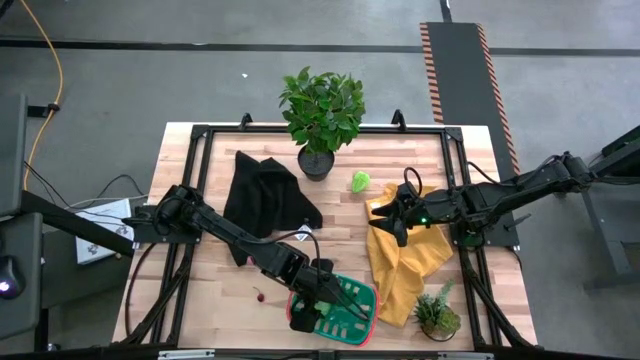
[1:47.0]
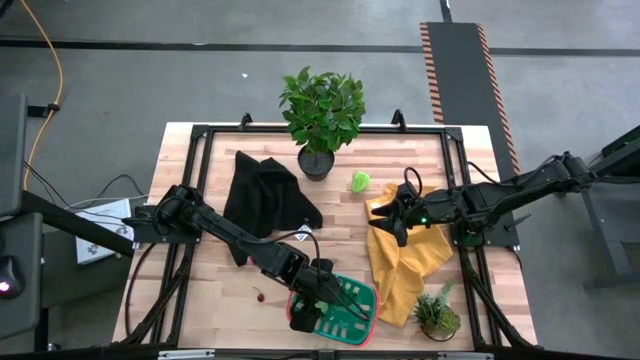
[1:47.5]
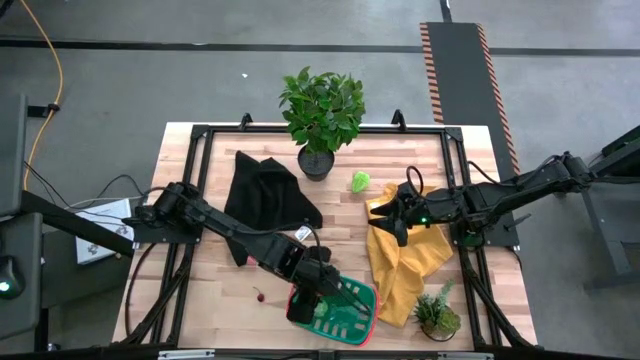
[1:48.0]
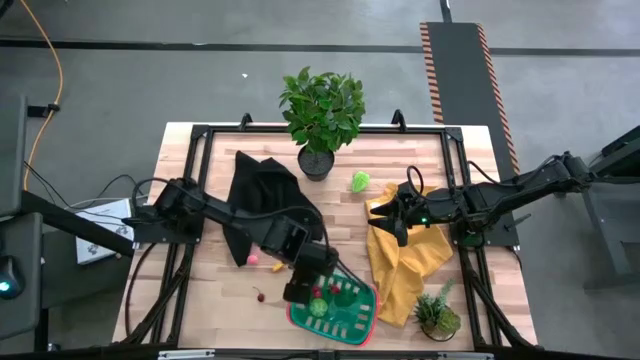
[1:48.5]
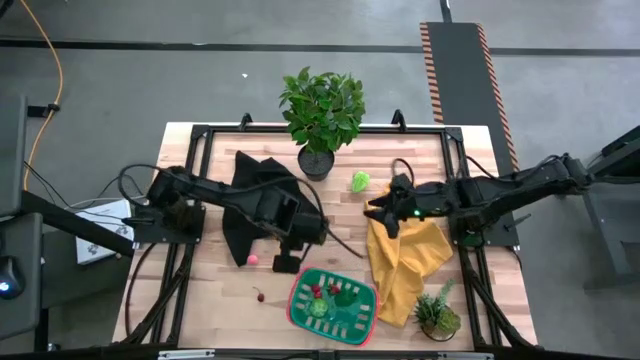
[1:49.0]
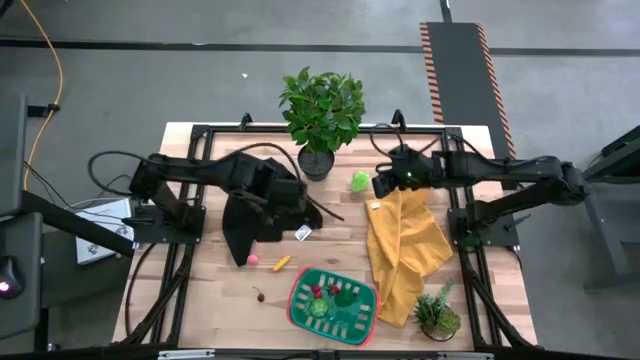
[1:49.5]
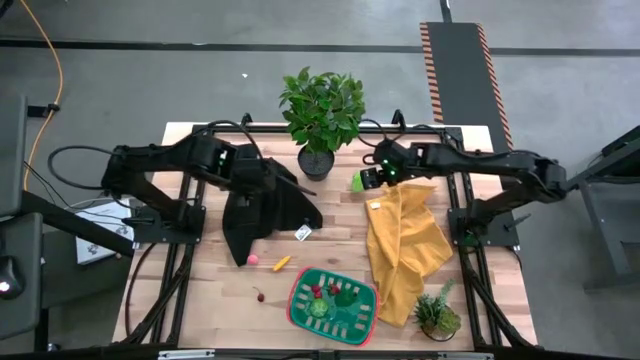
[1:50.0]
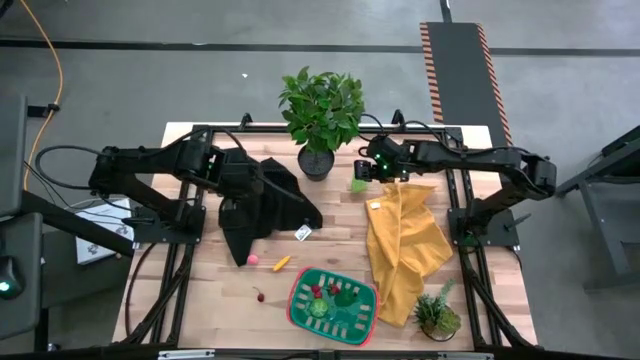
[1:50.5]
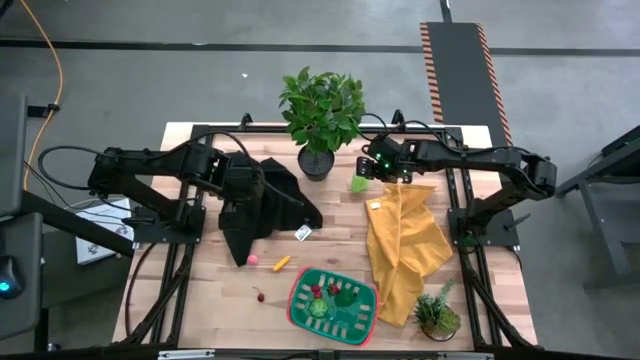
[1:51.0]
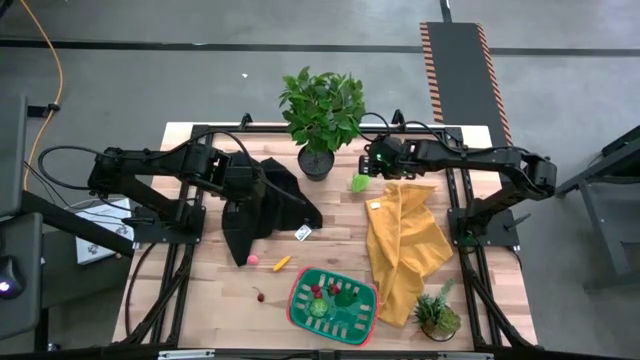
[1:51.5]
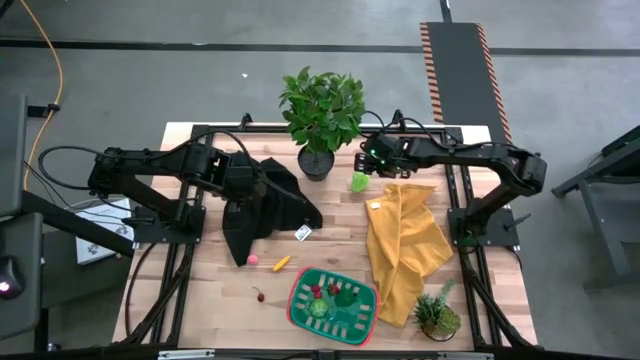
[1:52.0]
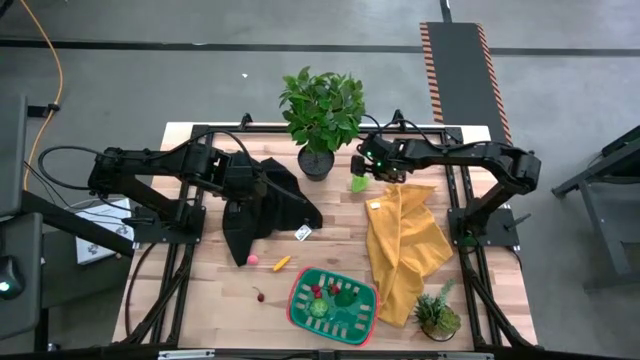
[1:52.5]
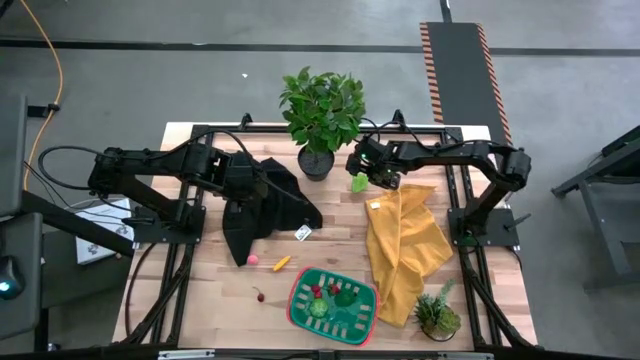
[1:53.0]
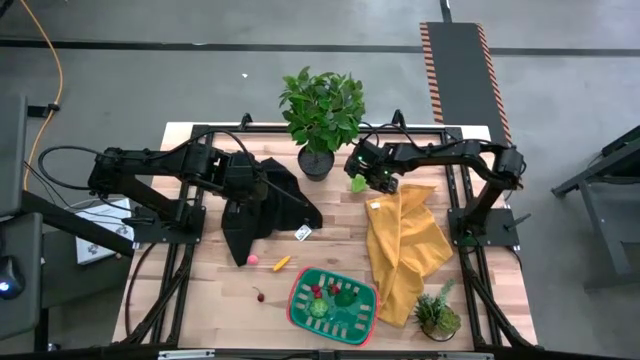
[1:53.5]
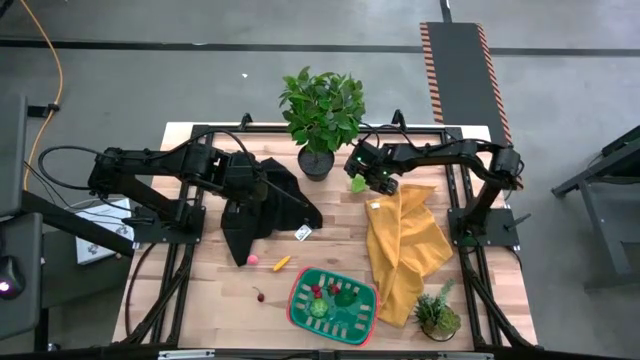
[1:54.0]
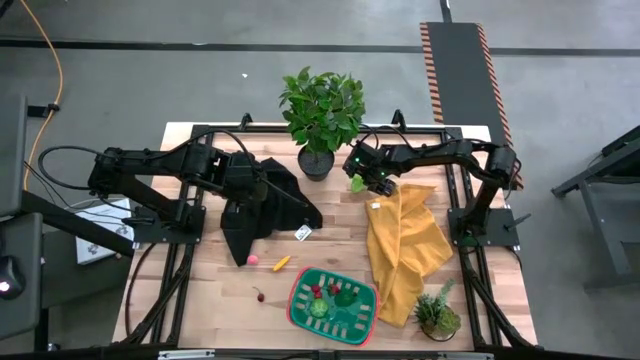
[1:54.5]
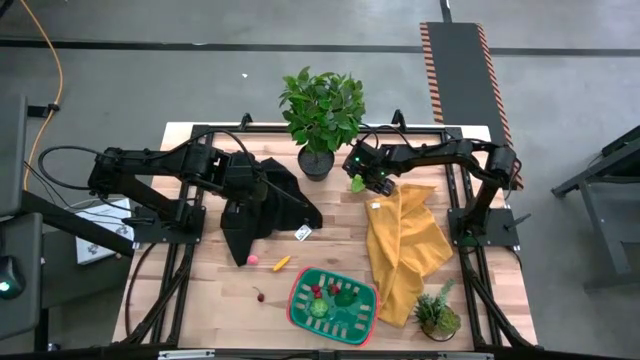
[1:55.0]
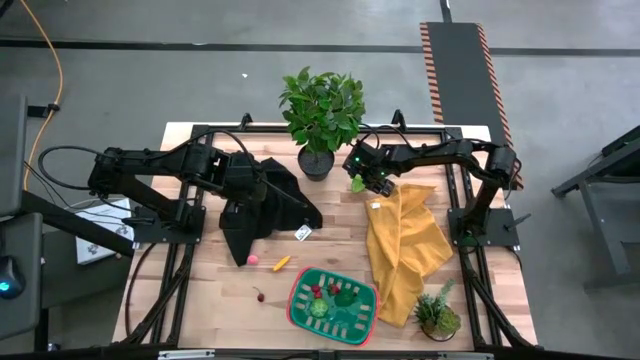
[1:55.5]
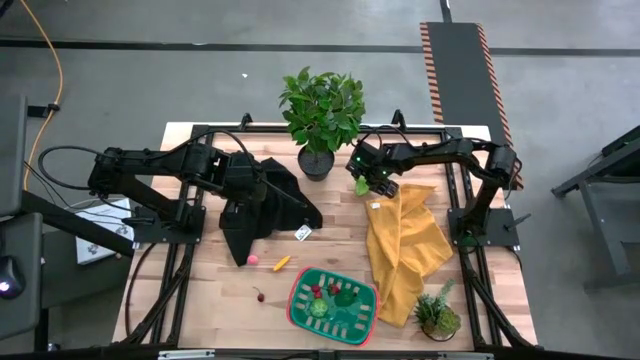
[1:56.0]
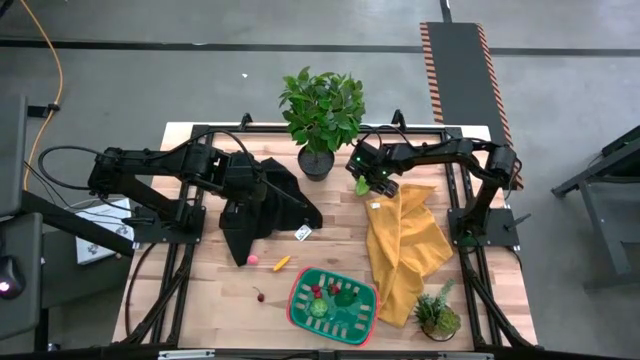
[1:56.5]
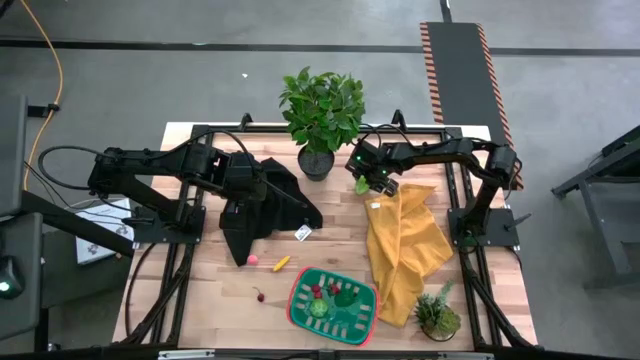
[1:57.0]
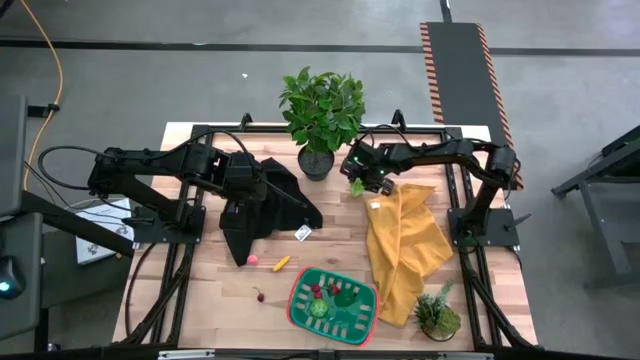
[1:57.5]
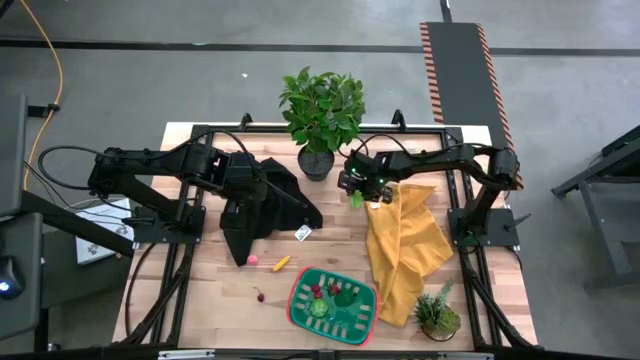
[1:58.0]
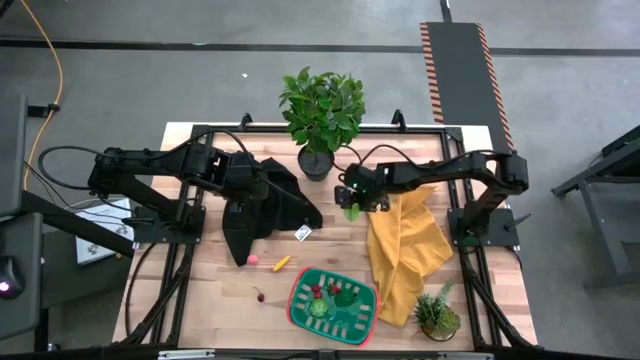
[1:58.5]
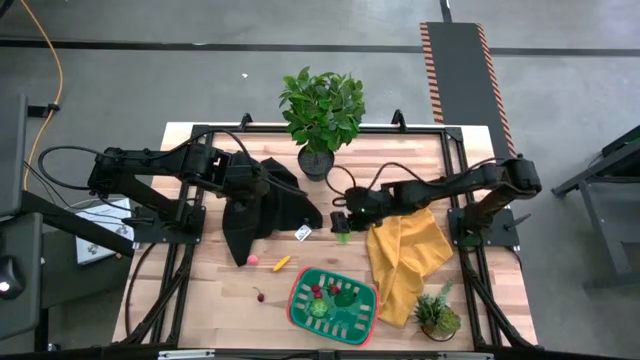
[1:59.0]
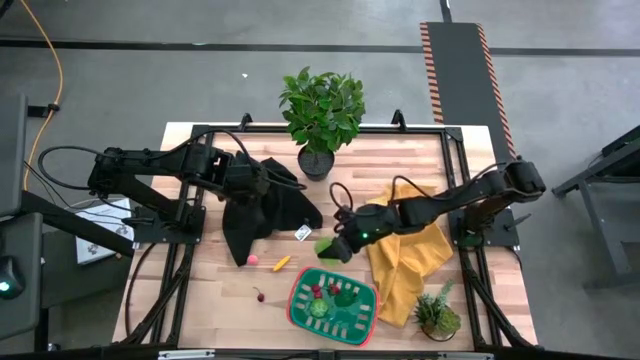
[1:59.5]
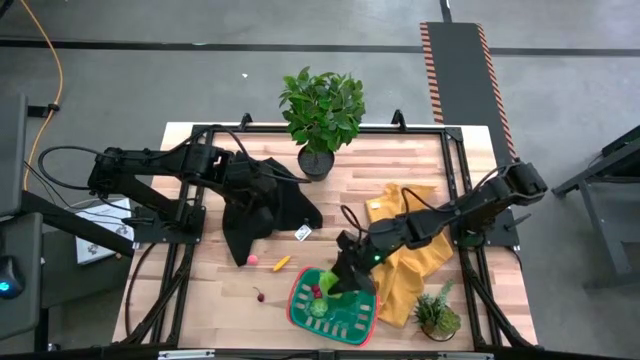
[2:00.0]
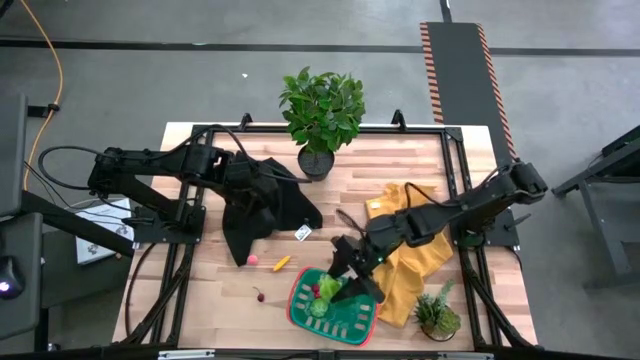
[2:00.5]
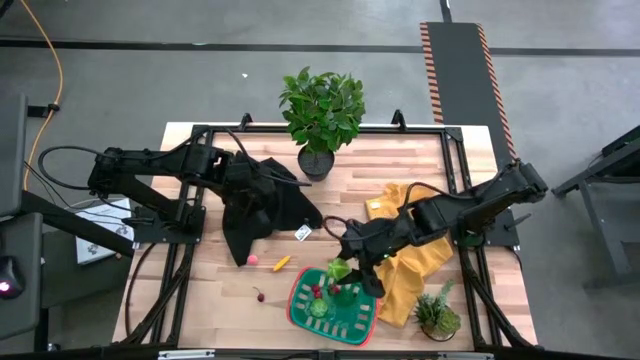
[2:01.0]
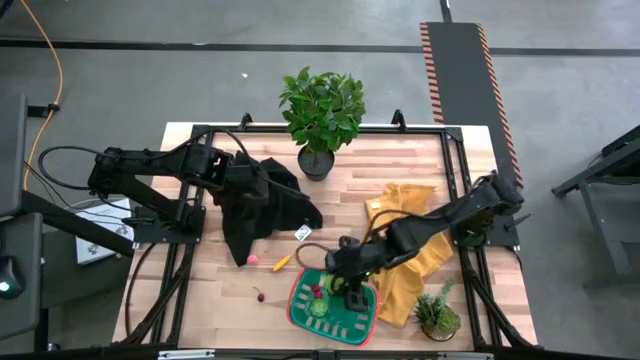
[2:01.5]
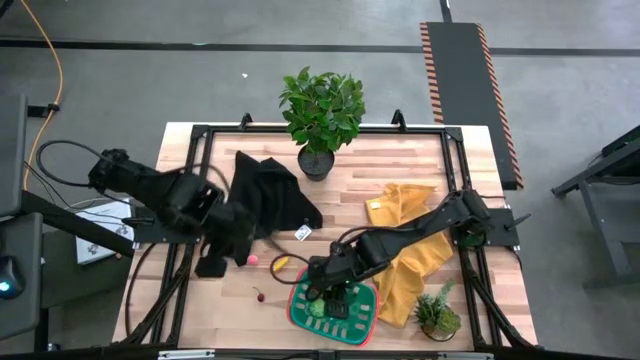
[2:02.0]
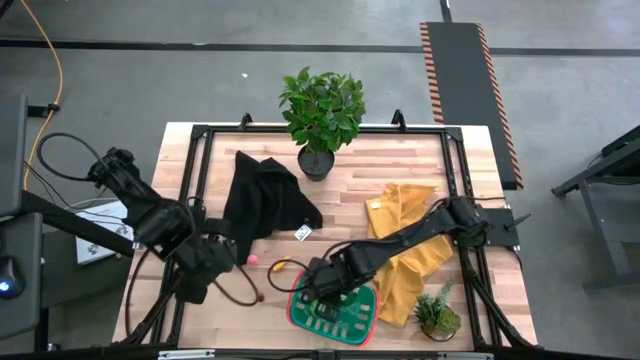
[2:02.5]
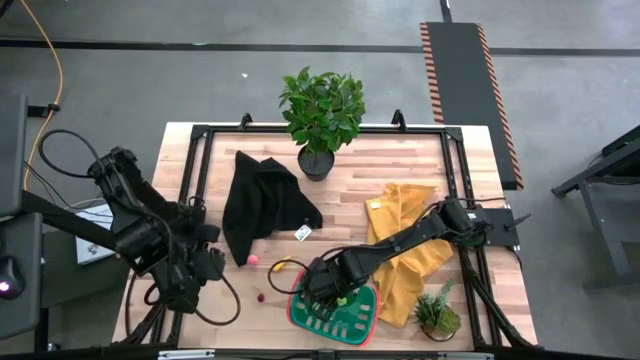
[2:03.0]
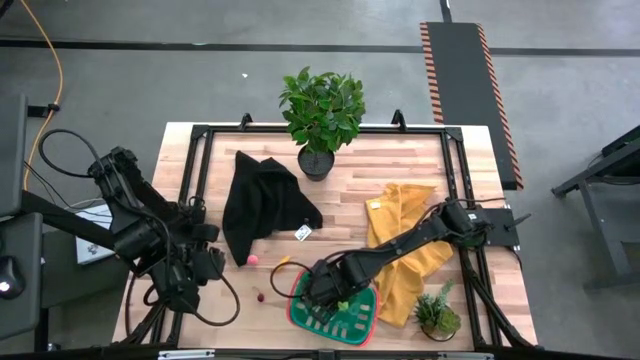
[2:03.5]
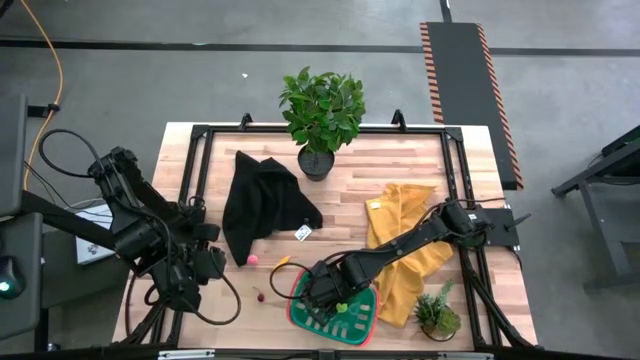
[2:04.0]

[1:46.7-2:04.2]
Task: Pick and placing Produce into tupperware
Put the green star fruit into the blue bin

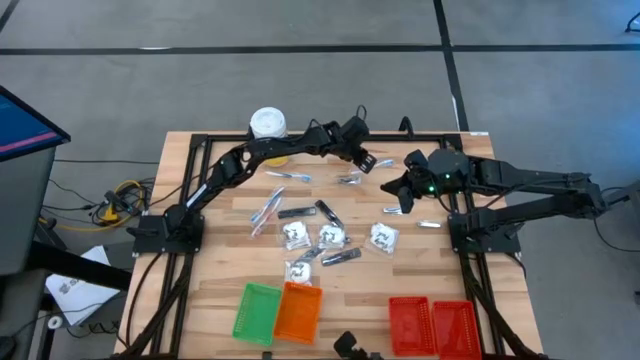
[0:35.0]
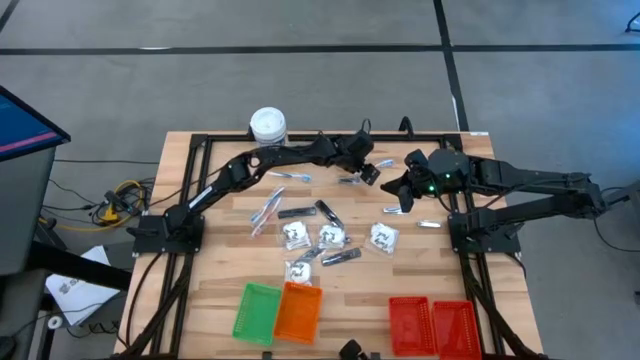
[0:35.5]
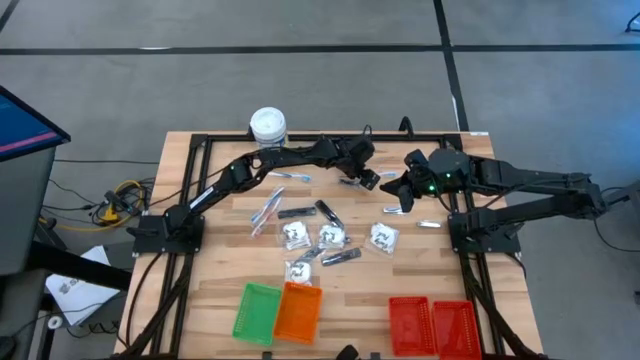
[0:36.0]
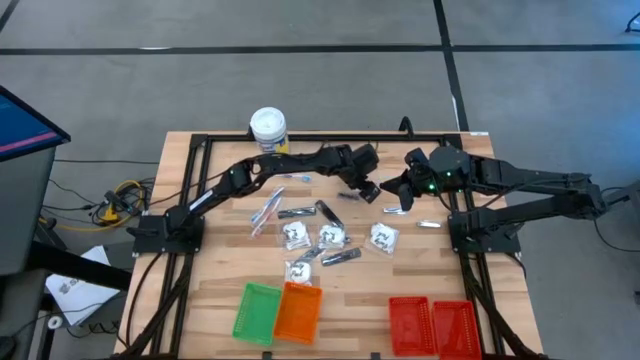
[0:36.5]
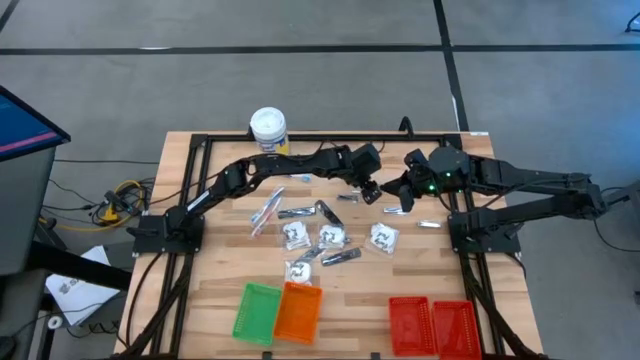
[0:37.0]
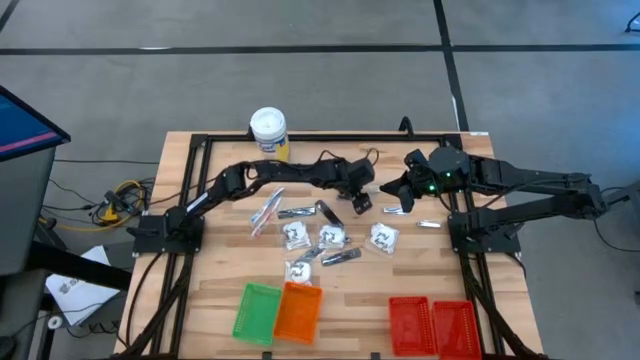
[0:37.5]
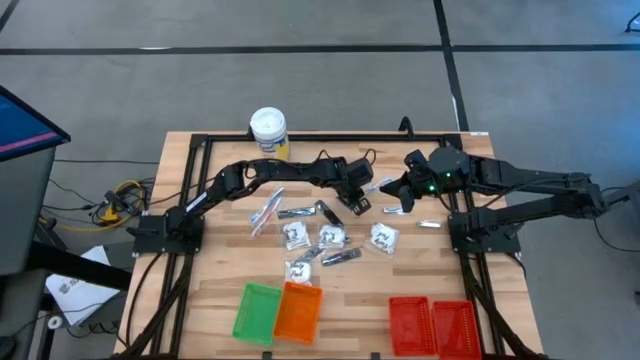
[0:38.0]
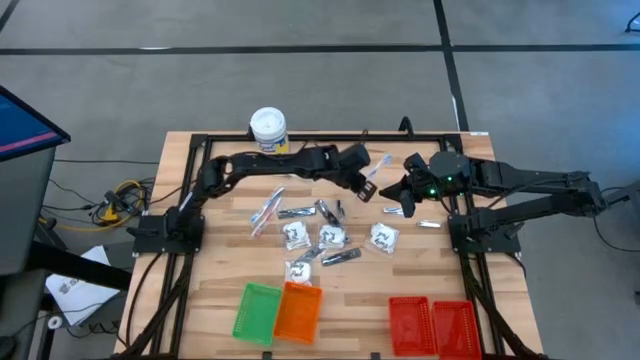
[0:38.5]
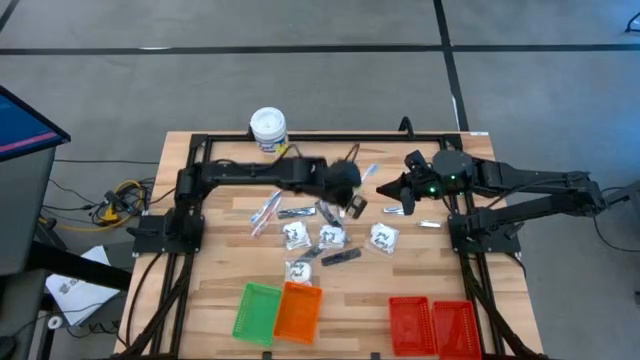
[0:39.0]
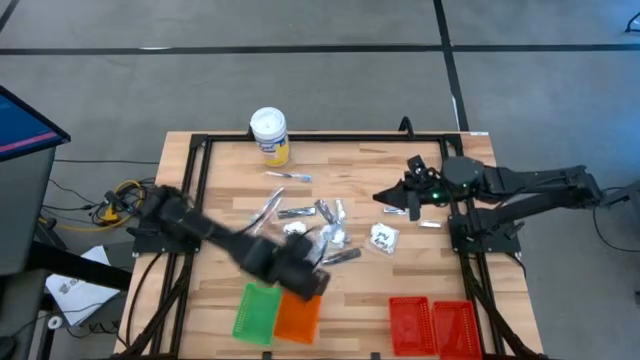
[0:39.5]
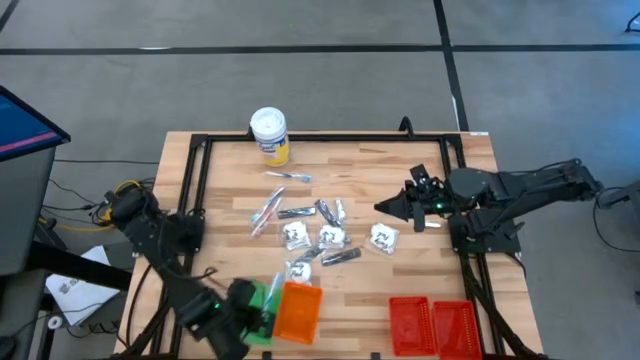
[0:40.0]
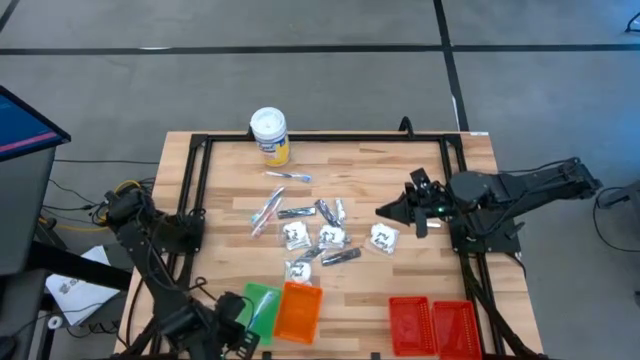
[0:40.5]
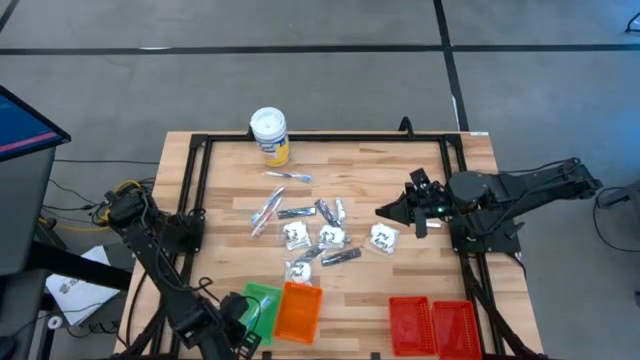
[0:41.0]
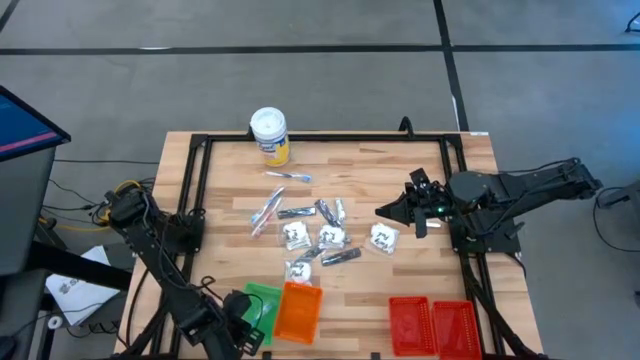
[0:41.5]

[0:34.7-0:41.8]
Task: Pick & Place Travel size toiletries
Put the blue toothbrush into the green basket
